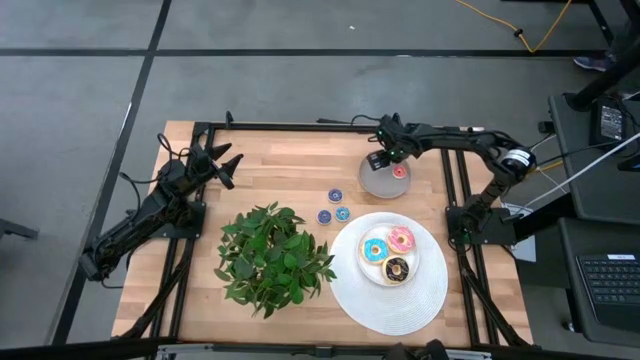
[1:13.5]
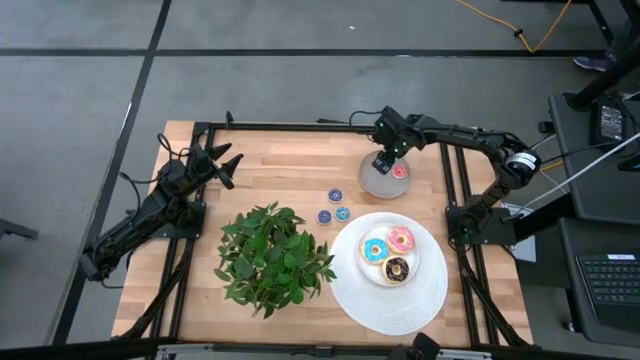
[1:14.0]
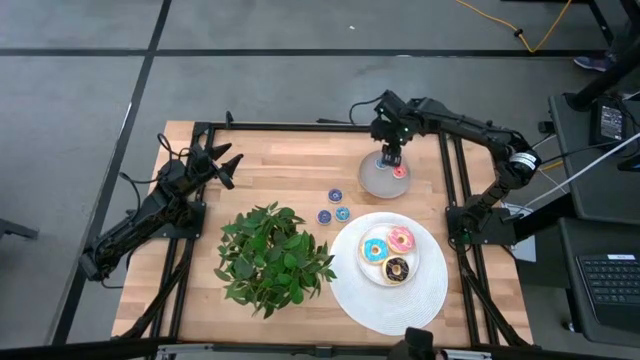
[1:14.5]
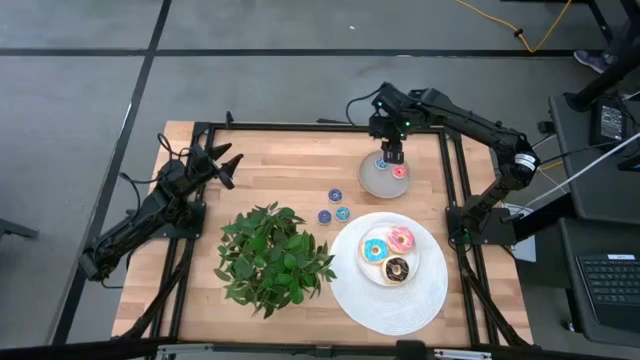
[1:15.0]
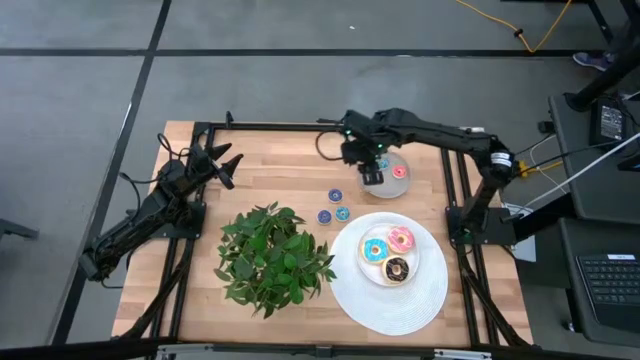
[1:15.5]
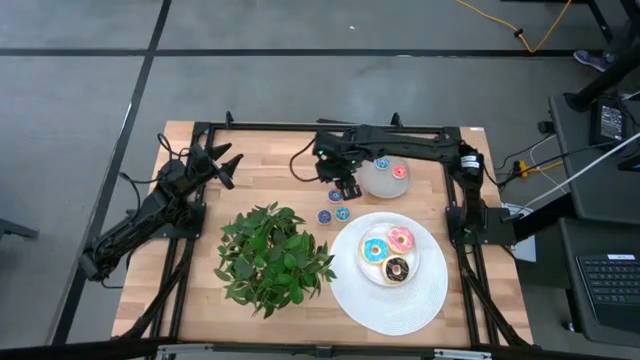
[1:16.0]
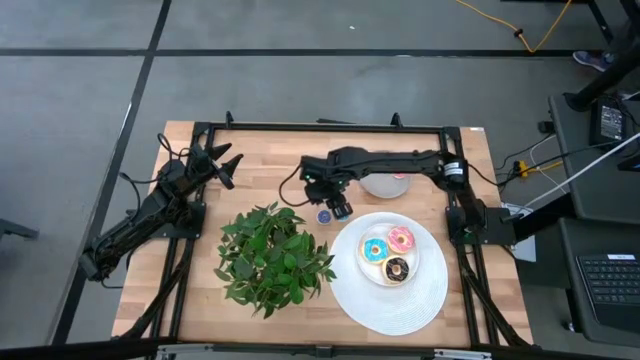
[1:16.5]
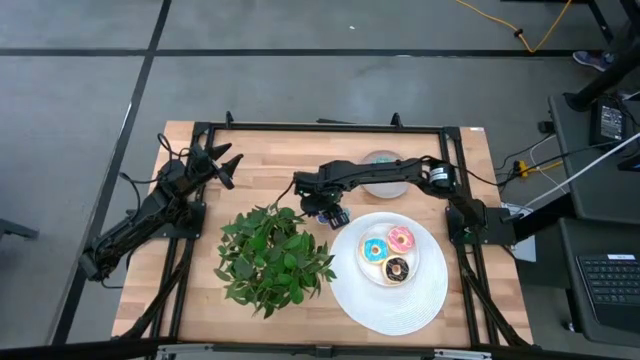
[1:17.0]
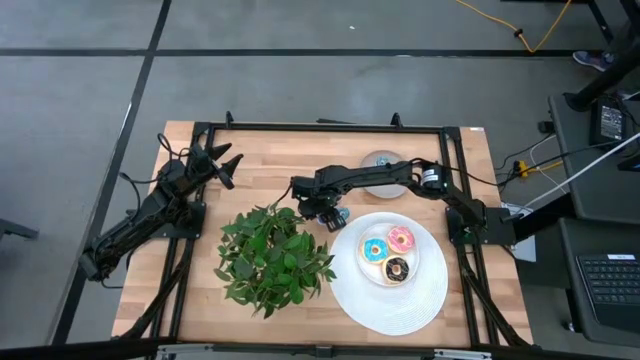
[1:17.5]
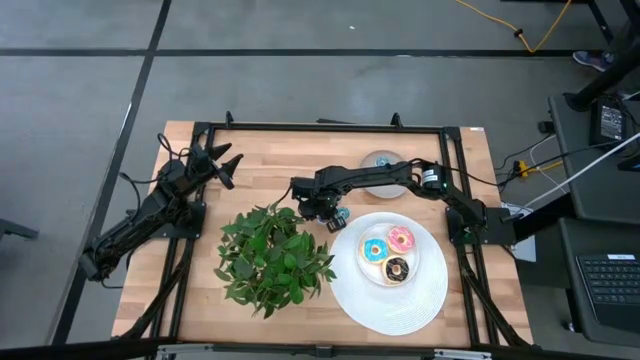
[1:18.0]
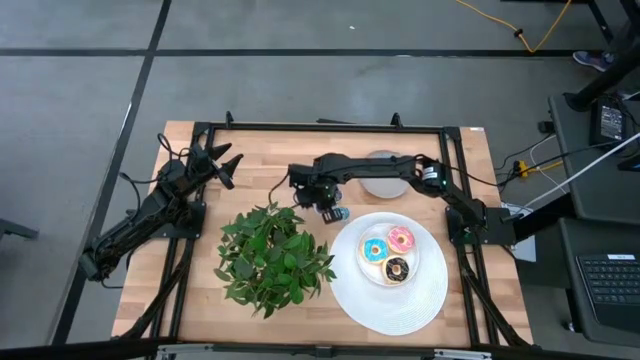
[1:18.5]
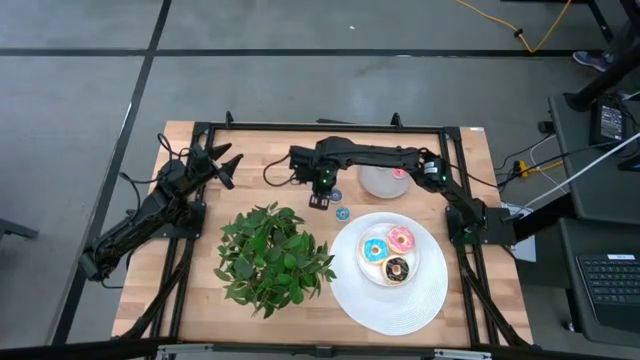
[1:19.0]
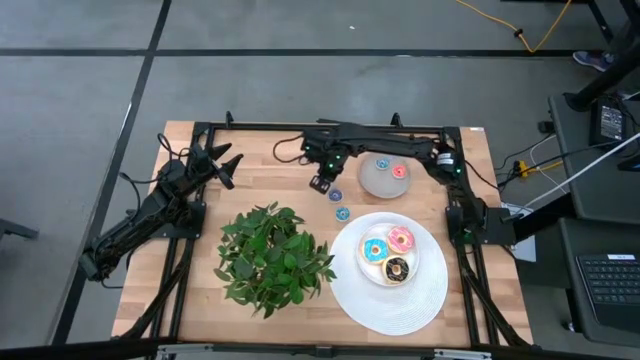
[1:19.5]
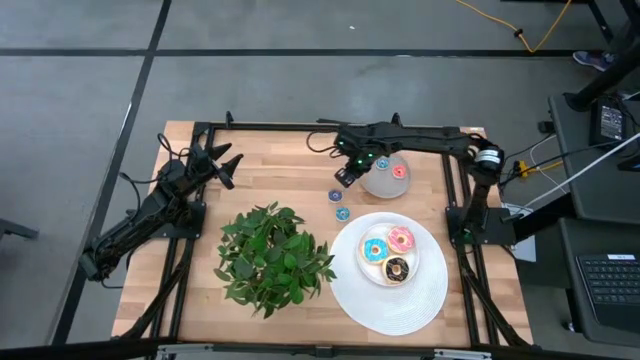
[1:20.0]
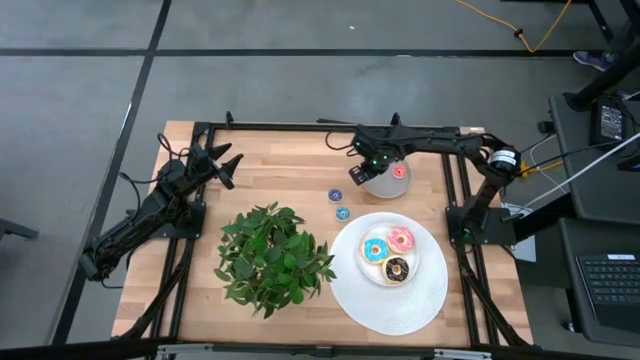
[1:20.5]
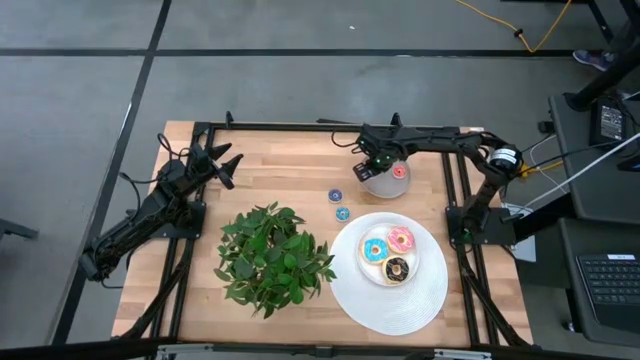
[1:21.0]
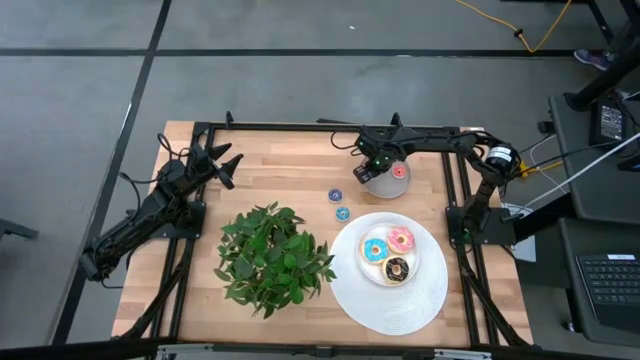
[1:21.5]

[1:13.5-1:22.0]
Task: Pick & Place donuts
Put the bottom small dark blue donut onto the gray plate

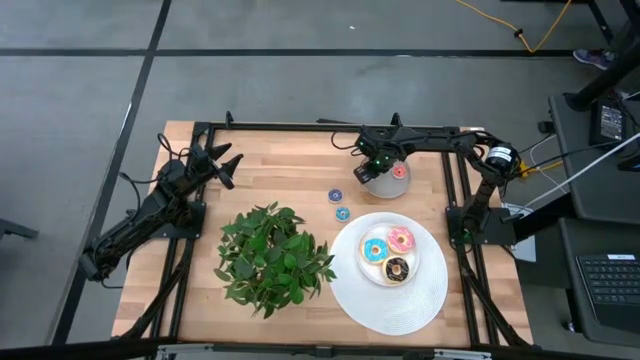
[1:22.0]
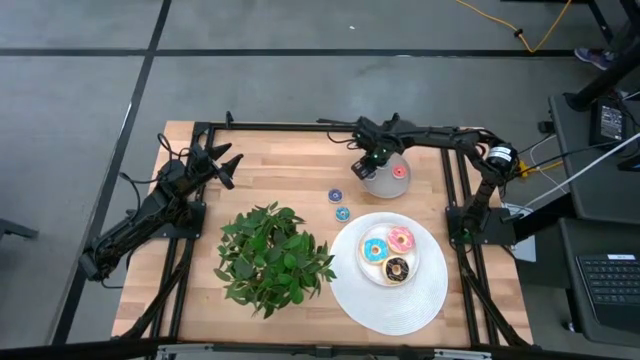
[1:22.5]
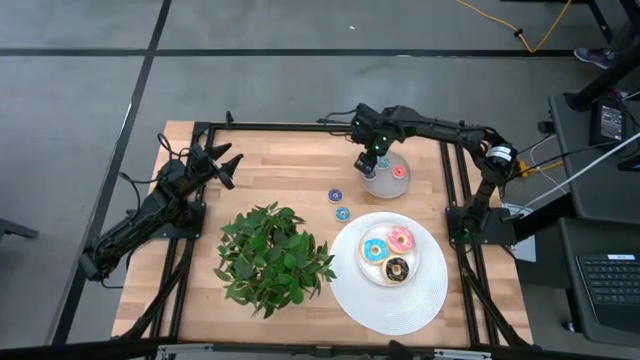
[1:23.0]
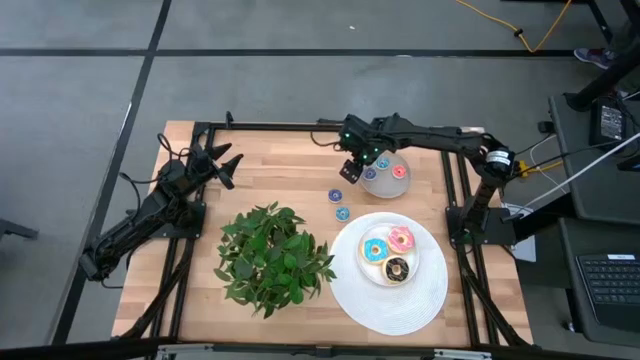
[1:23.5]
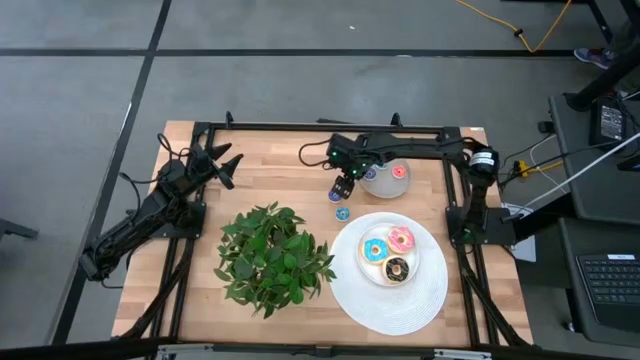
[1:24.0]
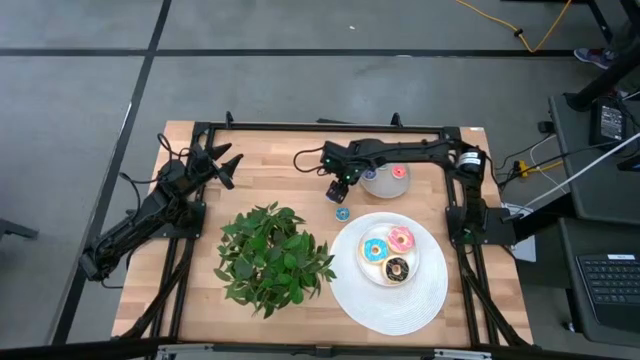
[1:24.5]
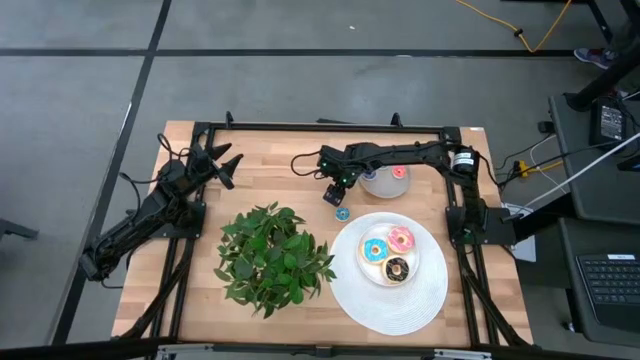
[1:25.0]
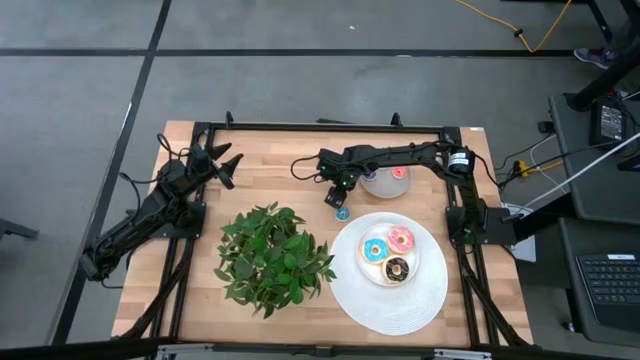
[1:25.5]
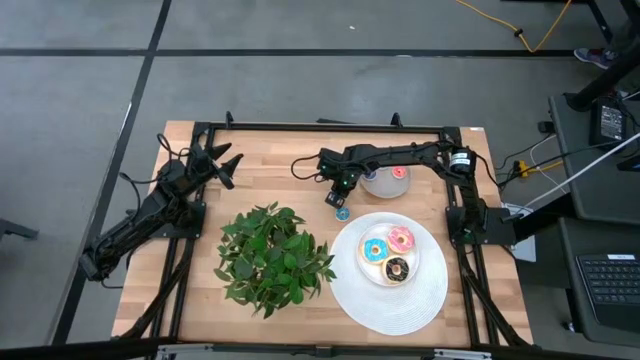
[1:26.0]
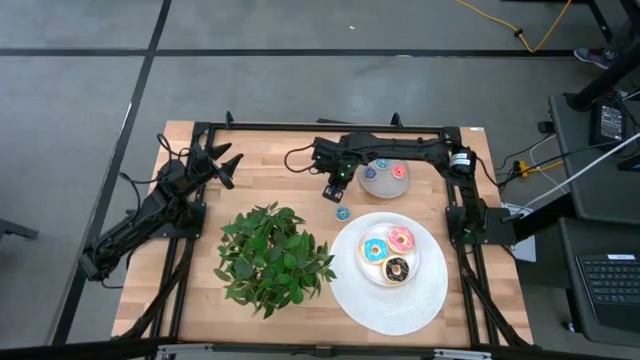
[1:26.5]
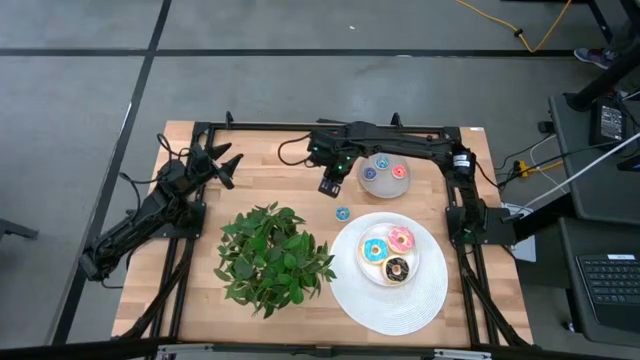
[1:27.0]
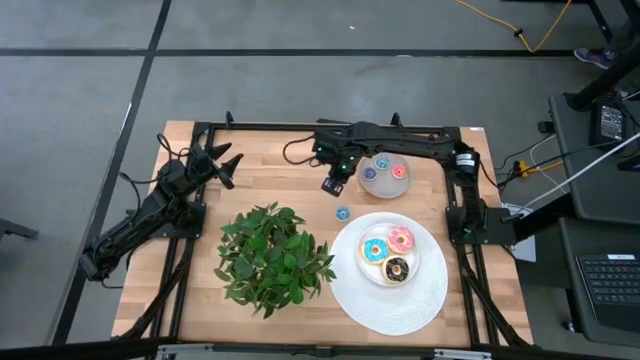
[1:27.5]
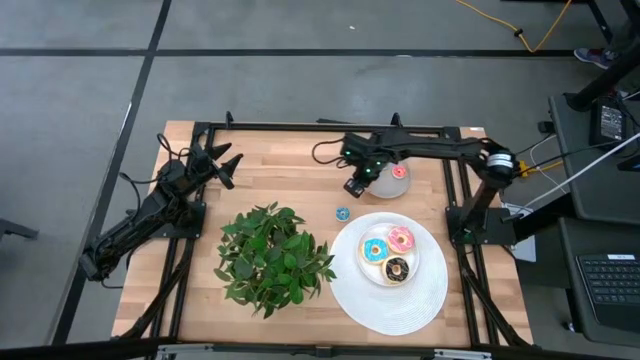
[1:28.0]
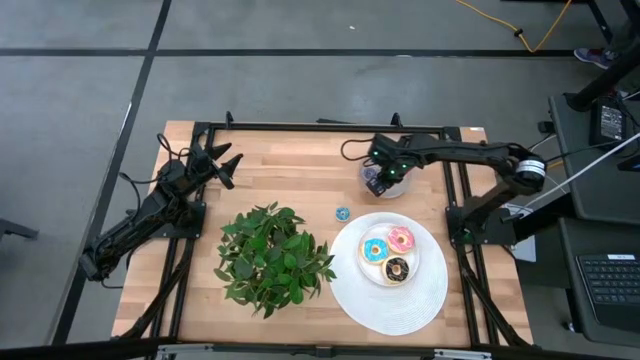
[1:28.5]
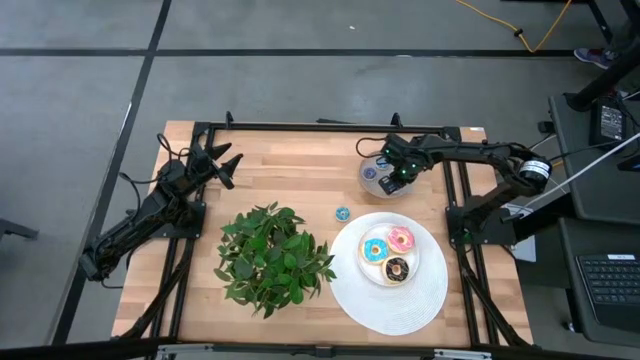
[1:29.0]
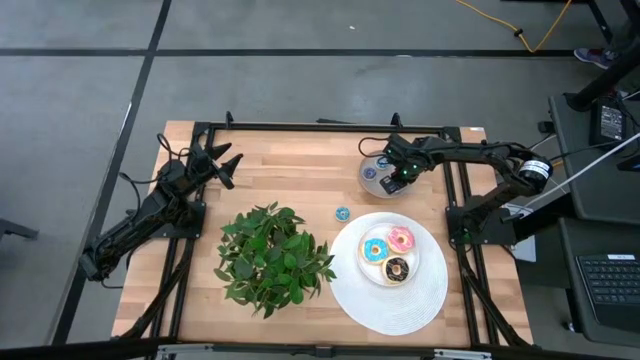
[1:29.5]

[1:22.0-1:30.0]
Put the small dark blue donut onto the gray plate

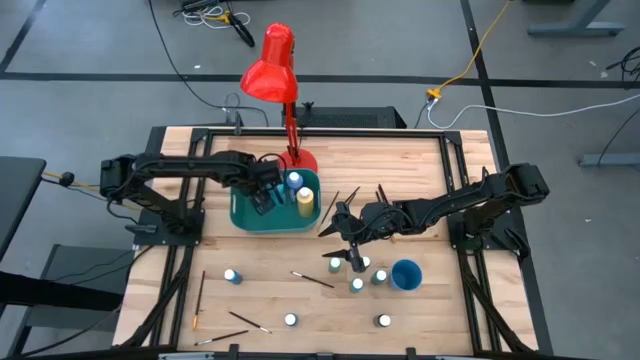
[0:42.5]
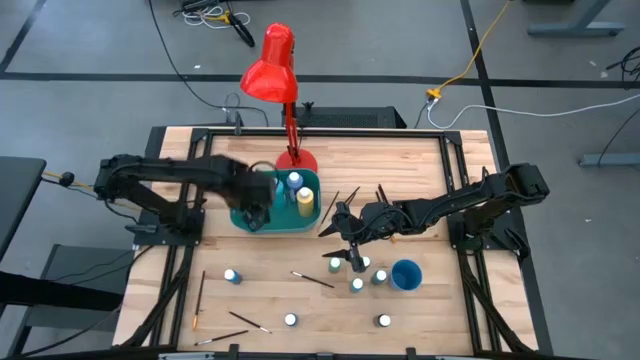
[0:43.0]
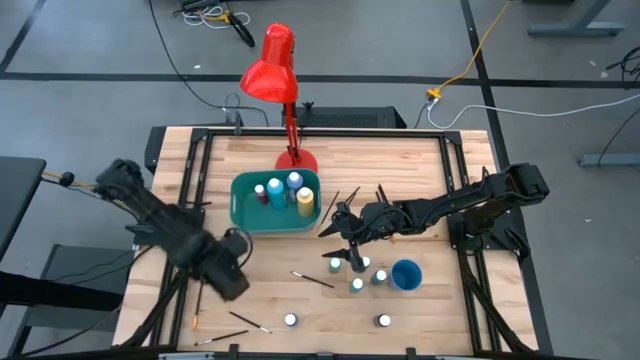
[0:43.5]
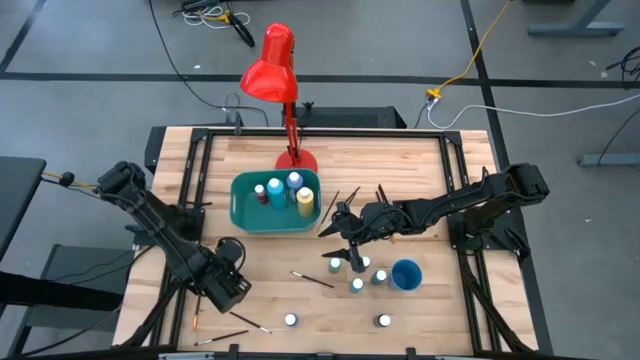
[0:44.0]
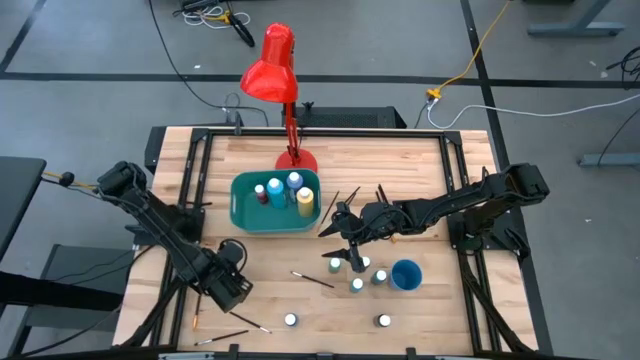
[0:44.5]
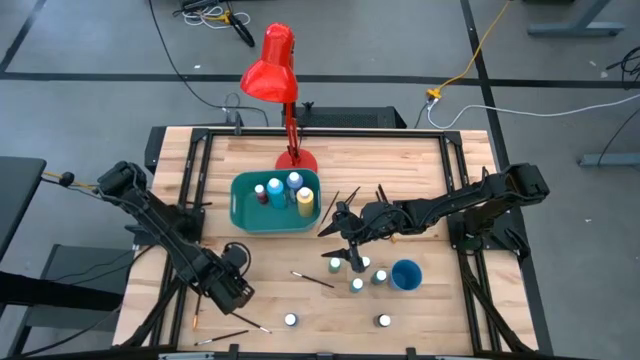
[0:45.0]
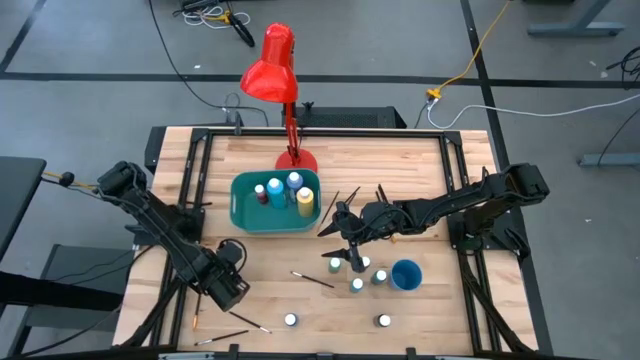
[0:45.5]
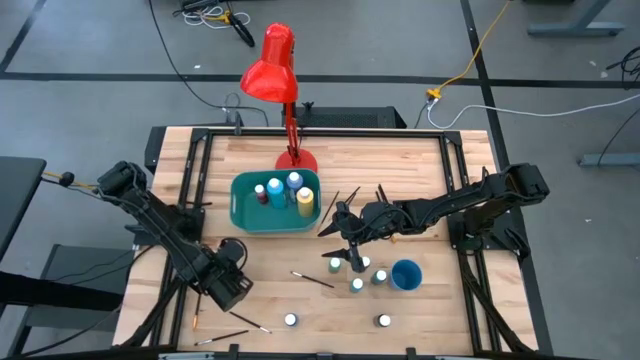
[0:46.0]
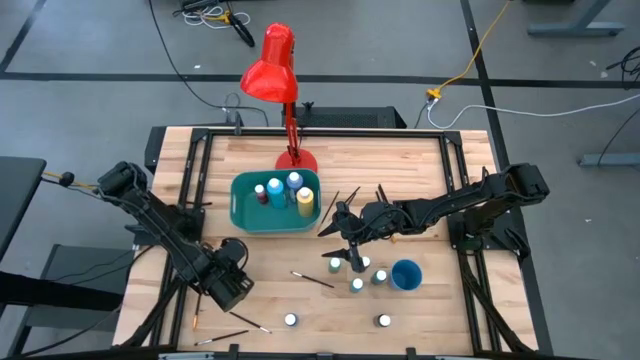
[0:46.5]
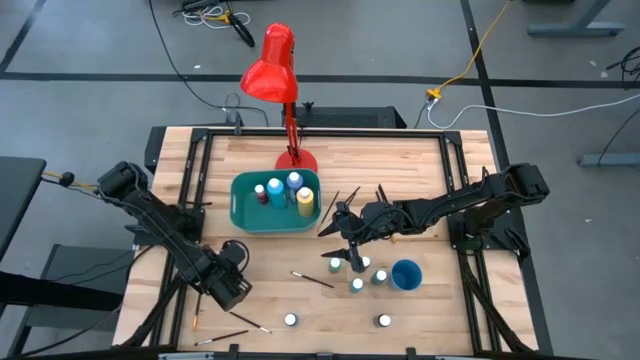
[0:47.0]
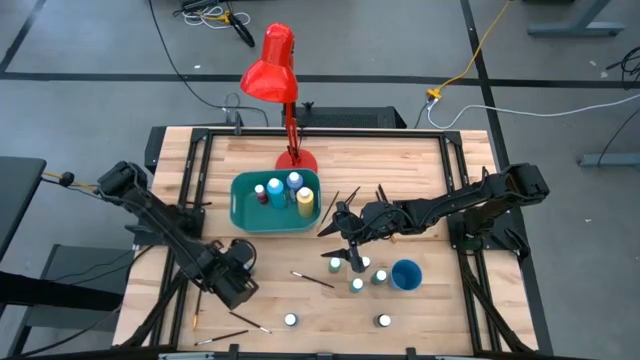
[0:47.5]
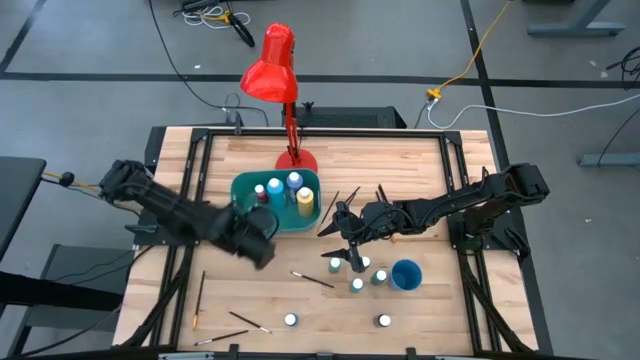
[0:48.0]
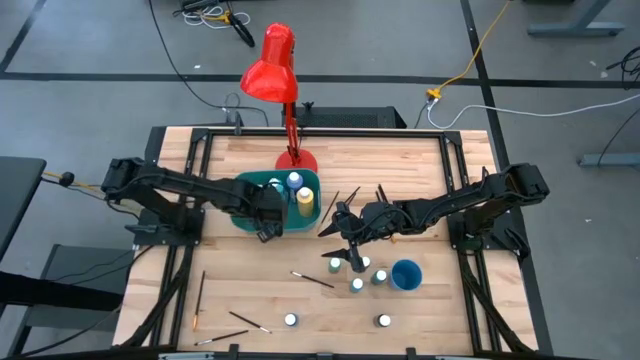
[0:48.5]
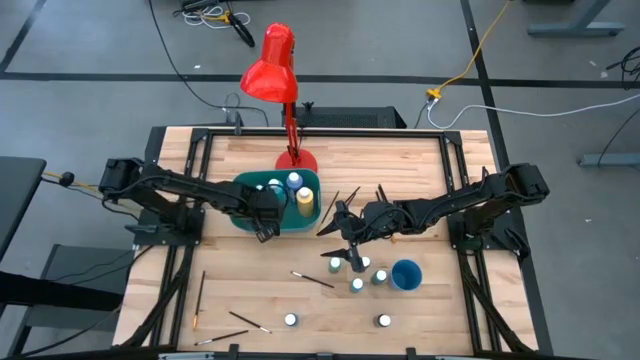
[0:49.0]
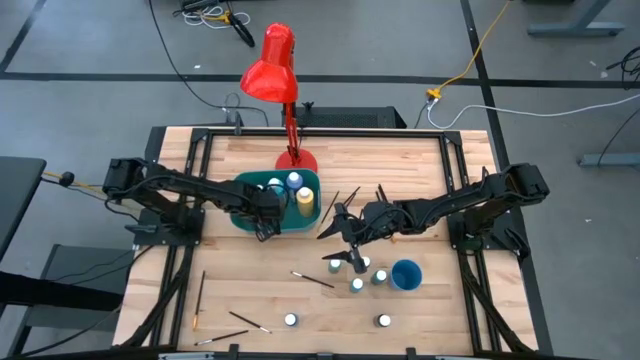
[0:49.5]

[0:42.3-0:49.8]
Task: Pick & Place Paint Supplies
Put the small light blue paint bottle into the green bin
